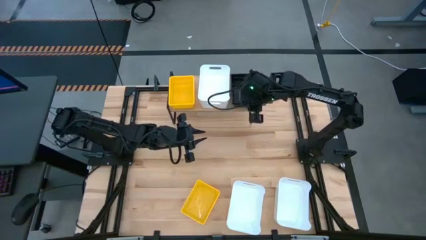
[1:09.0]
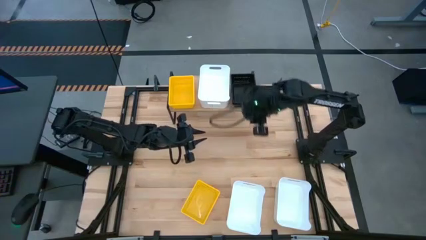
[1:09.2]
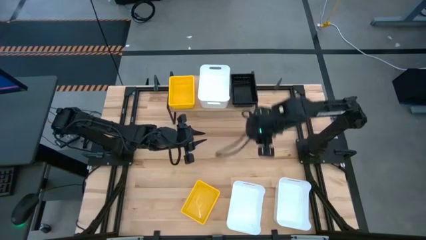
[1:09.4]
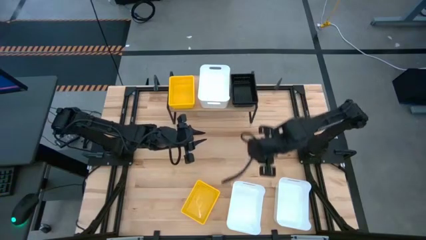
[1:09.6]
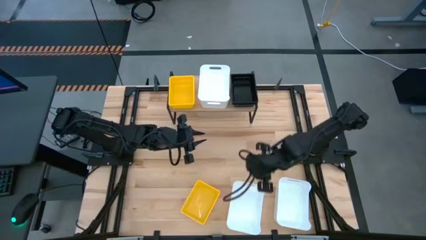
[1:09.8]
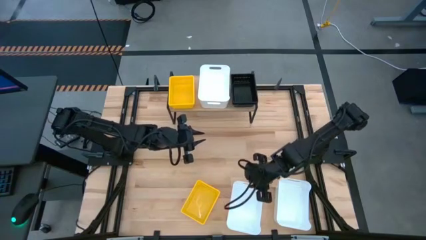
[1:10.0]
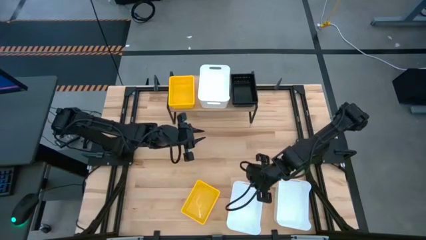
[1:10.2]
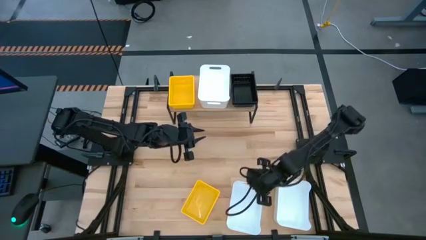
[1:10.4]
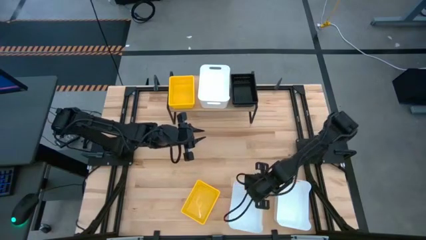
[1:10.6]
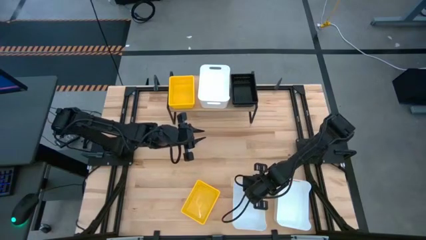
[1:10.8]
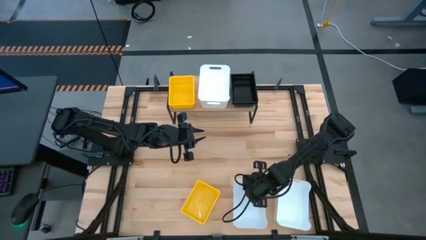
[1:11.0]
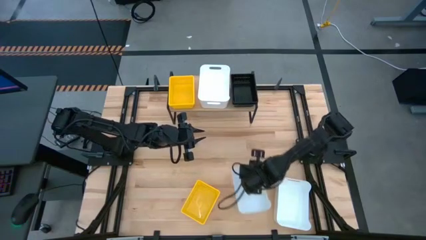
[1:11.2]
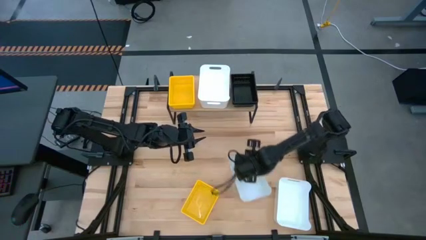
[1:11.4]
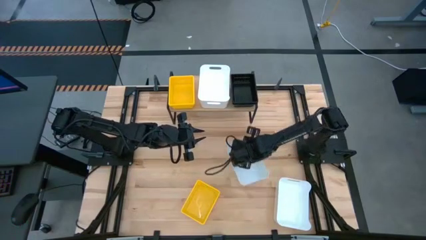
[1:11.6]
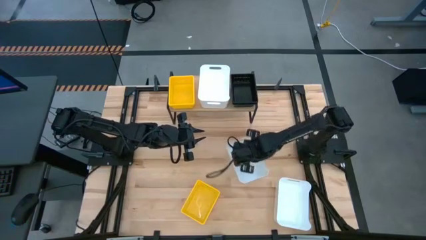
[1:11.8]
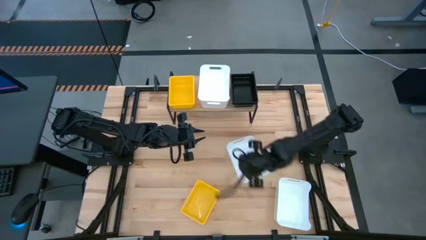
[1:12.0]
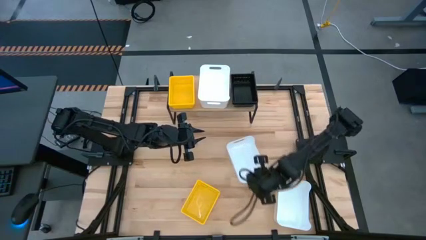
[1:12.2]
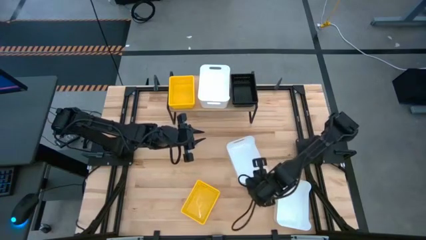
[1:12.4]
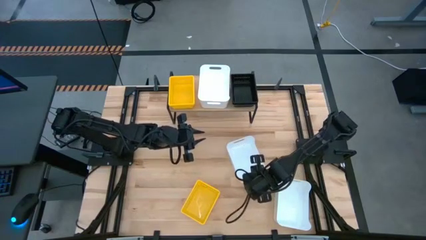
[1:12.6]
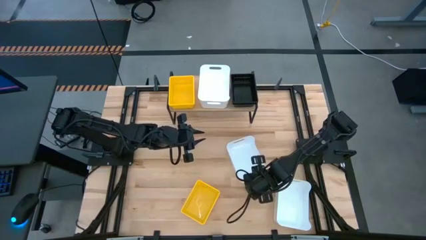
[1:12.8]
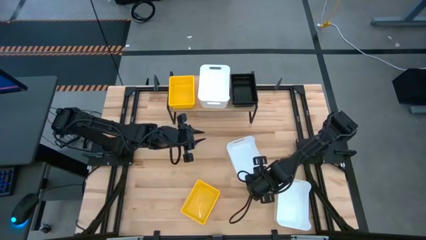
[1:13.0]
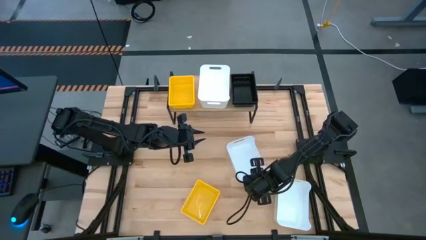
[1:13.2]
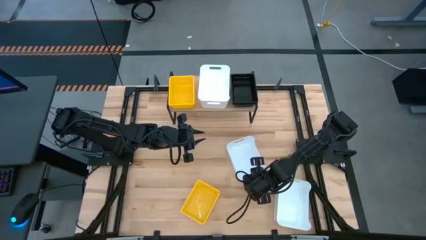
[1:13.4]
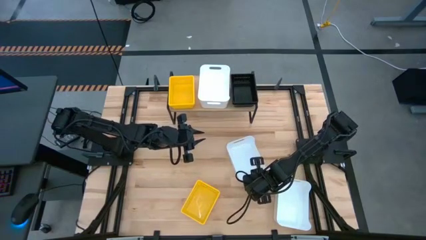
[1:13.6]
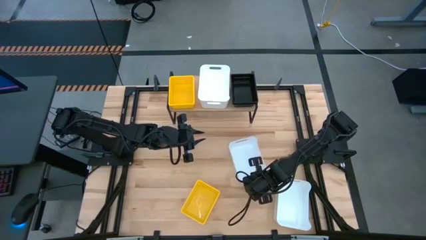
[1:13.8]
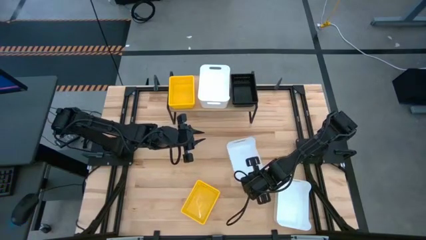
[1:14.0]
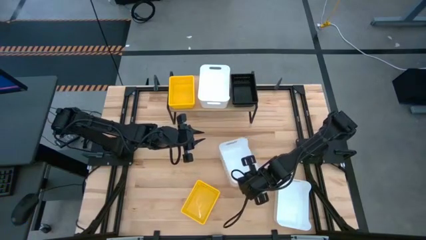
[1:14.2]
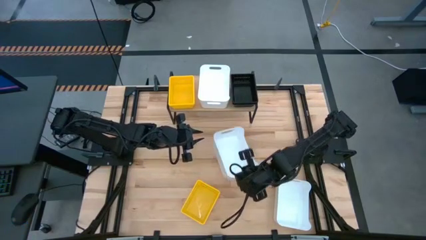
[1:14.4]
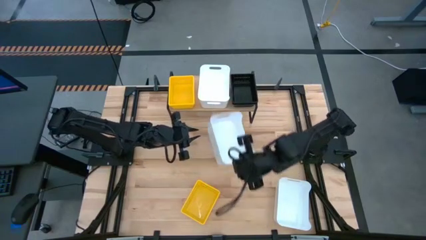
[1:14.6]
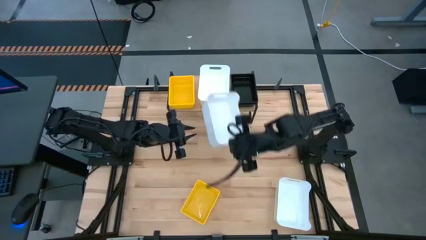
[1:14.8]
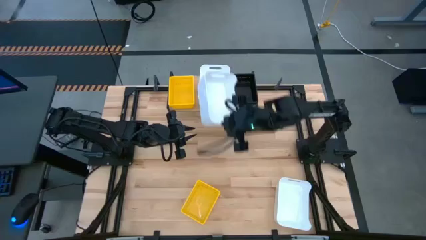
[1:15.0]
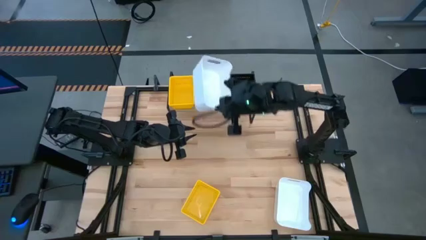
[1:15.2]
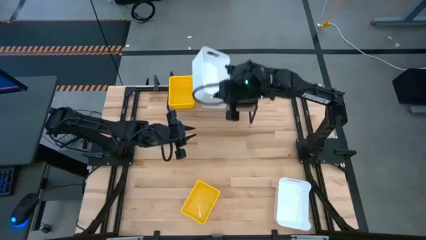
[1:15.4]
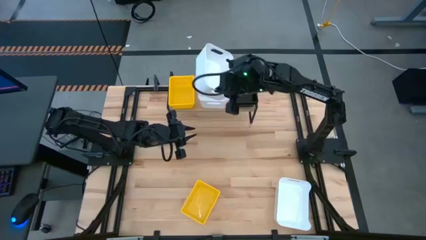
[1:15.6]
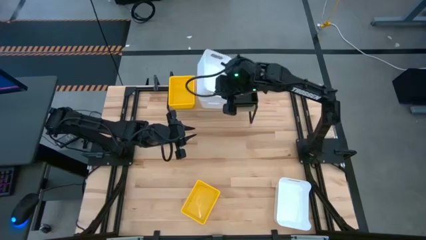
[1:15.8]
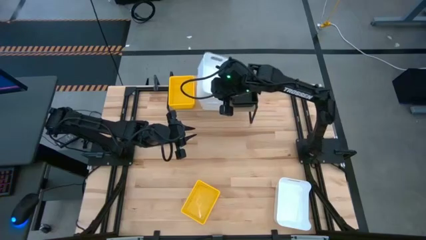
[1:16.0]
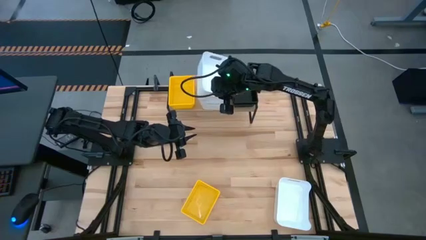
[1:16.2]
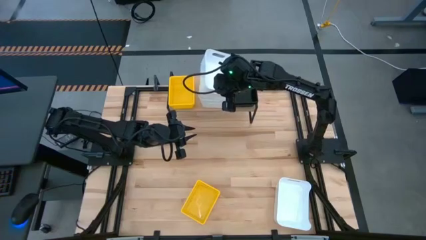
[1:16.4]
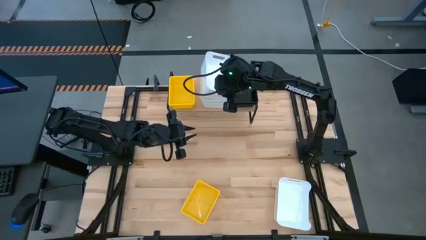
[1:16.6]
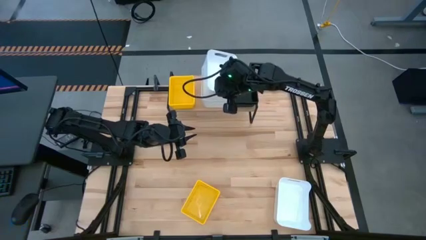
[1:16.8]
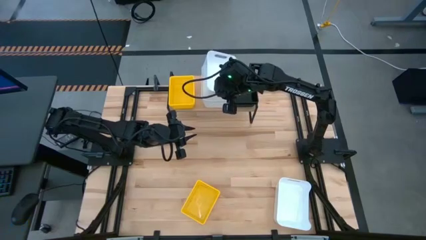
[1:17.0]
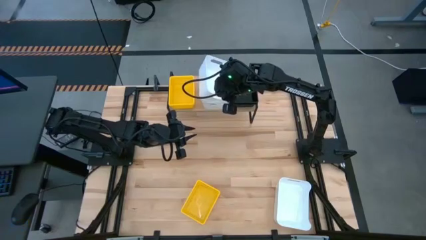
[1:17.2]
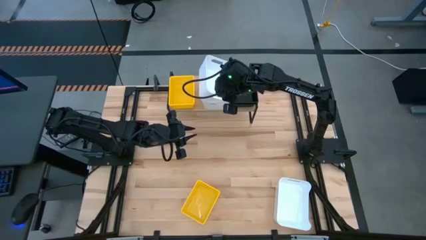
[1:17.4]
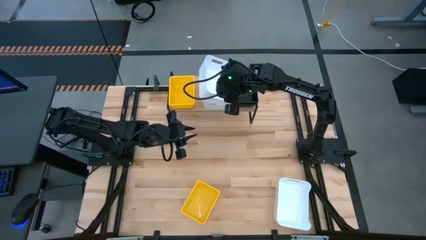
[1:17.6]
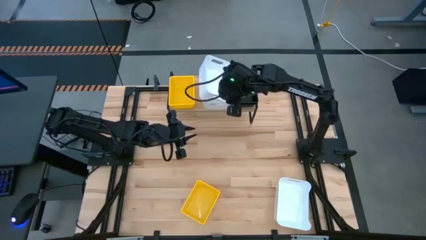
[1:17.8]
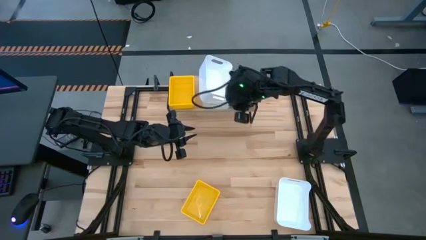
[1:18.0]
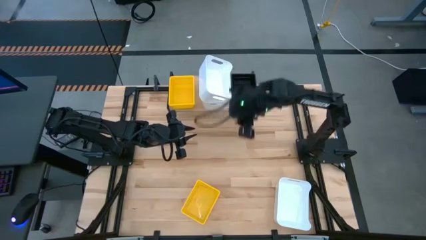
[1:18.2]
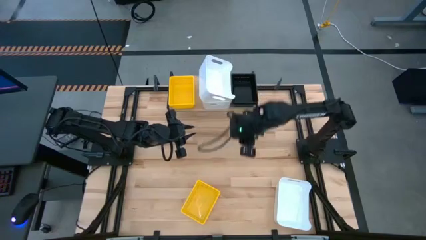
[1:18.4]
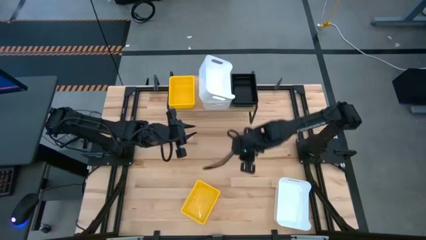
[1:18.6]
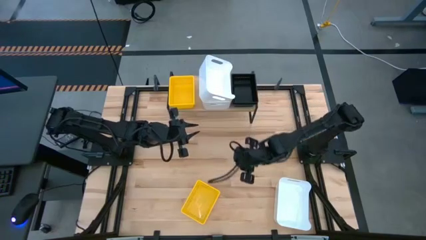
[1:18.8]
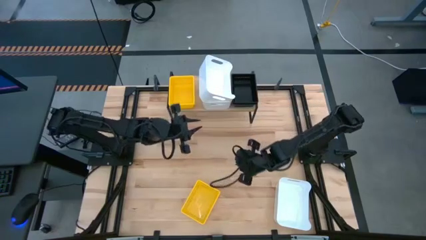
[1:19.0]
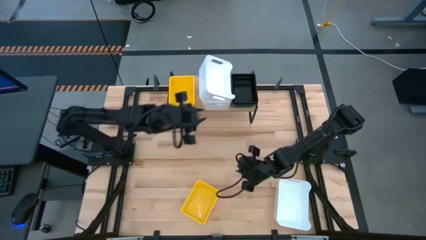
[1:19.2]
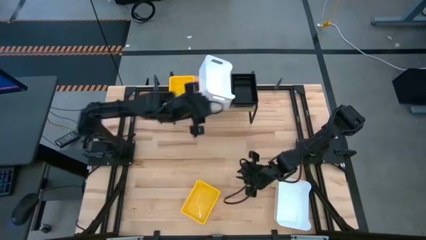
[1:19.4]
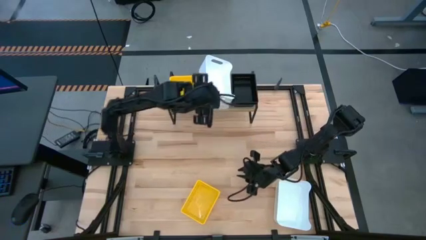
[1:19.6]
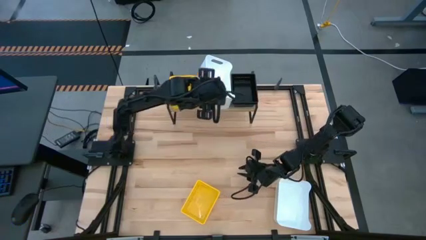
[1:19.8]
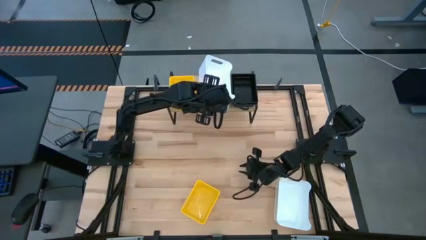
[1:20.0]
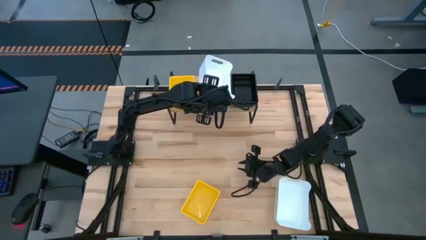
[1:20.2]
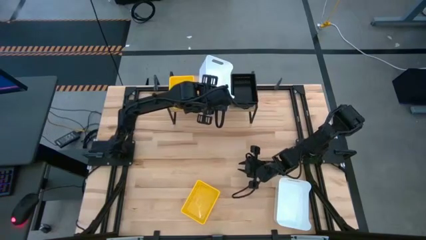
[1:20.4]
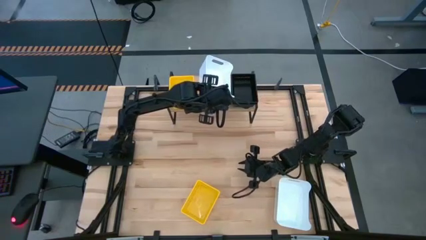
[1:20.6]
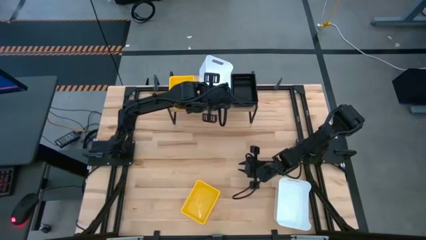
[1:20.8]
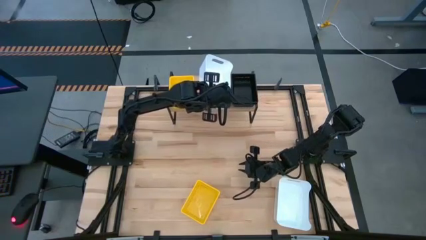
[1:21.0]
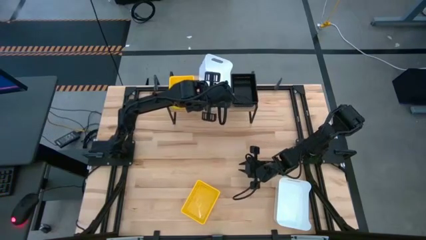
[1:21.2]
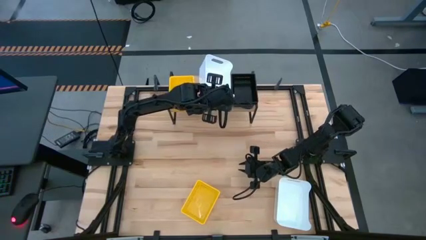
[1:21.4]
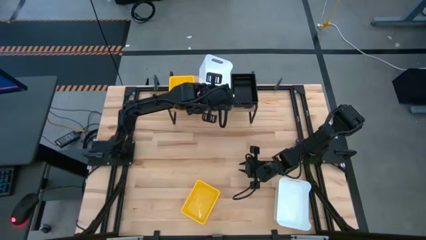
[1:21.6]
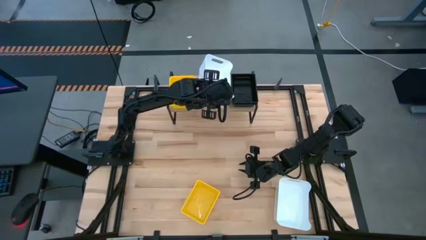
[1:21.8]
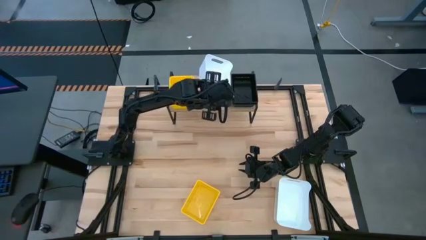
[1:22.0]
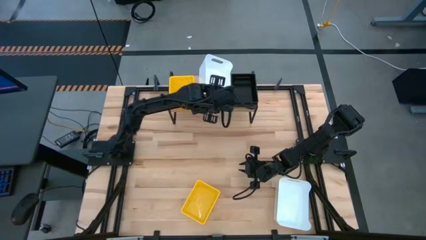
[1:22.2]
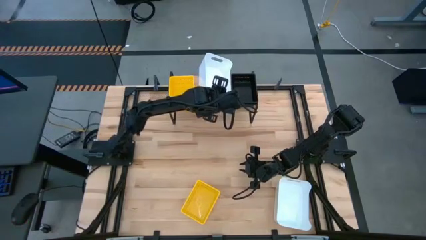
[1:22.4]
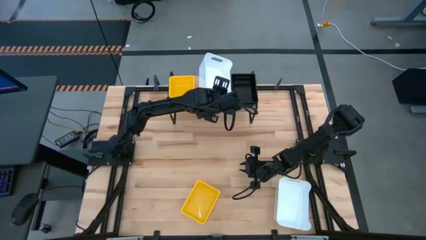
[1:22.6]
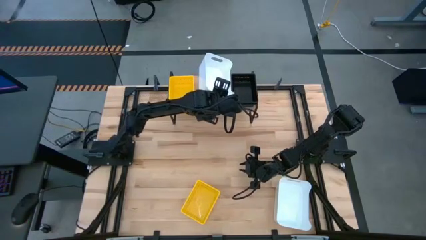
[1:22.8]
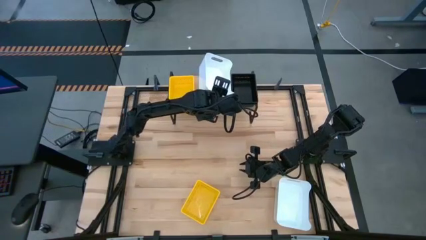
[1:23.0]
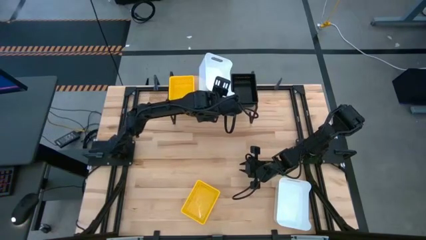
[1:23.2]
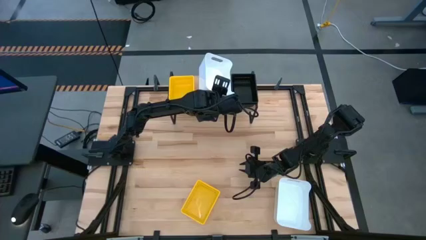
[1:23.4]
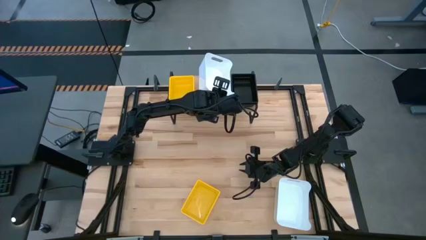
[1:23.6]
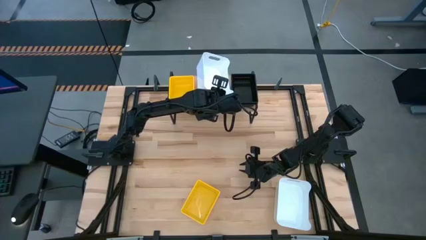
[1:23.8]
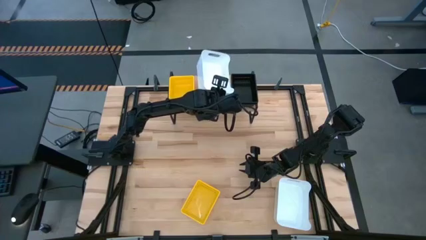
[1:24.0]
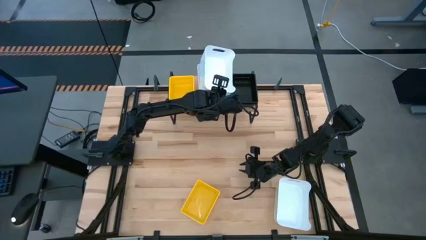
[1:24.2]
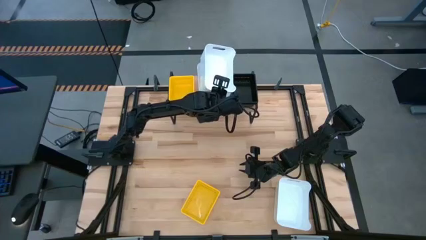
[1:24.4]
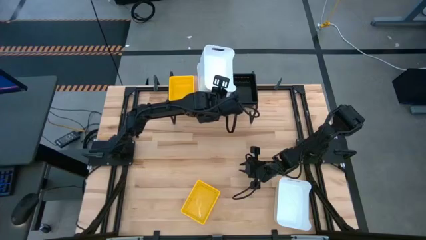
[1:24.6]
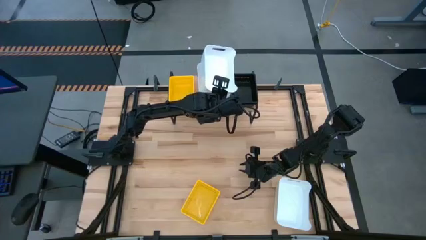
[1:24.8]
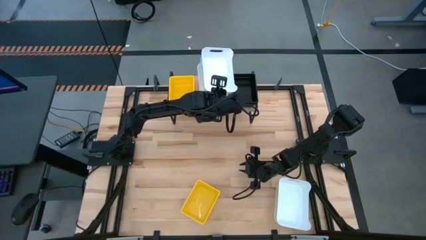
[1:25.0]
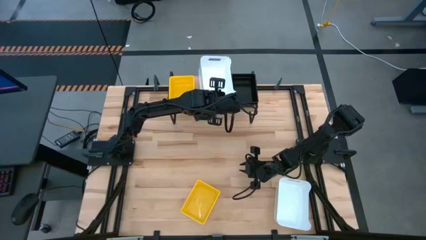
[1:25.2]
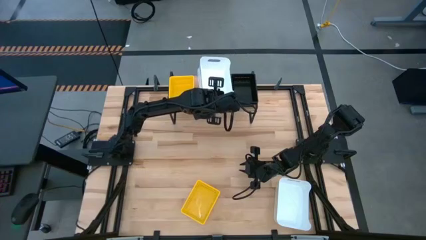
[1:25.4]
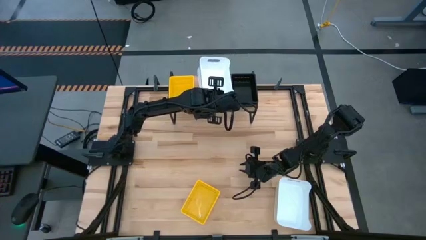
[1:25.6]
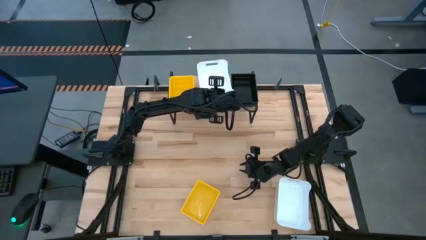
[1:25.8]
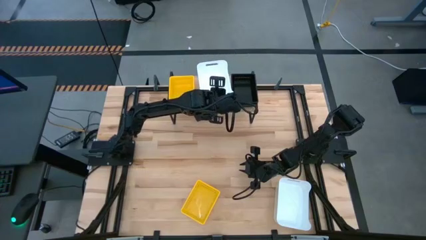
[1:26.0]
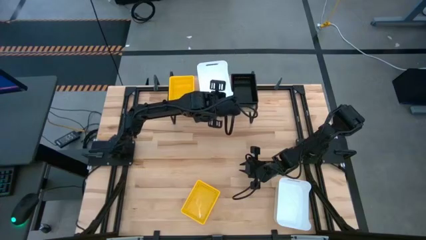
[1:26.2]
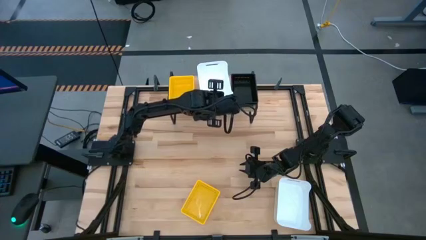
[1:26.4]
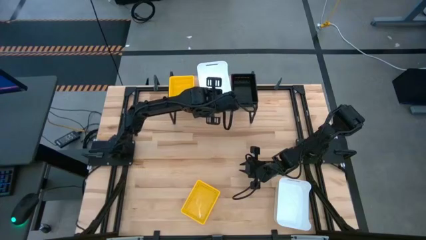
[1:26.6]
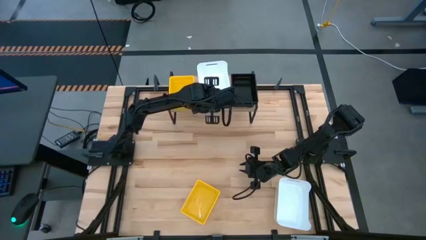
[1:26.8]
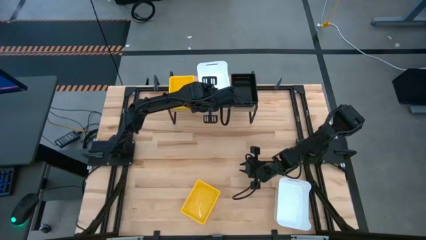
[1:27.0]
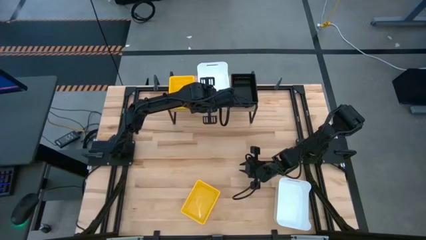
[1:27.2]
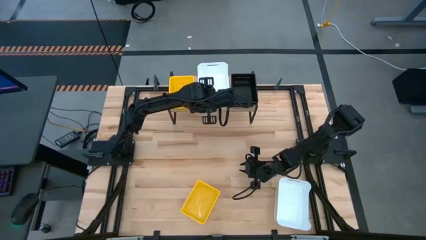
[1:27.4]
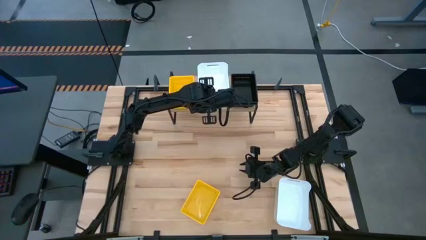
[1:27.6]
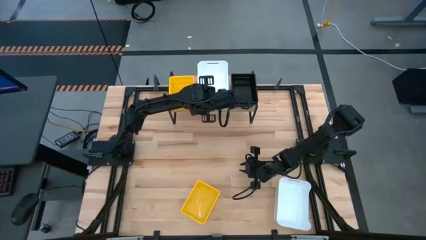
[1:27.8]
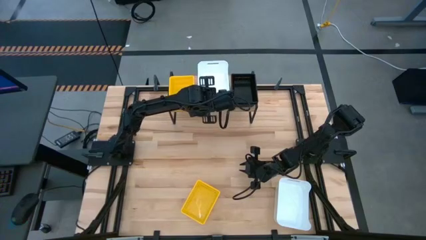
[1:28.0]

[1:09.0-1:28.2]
Task: Stack baskets on shelf by color
Stack the left white bin on the white bin on the shelf
